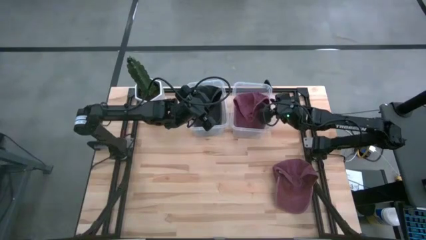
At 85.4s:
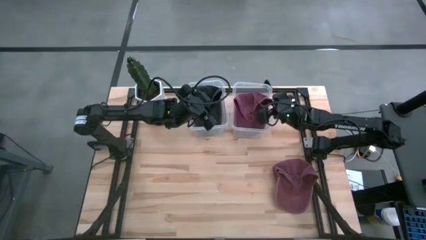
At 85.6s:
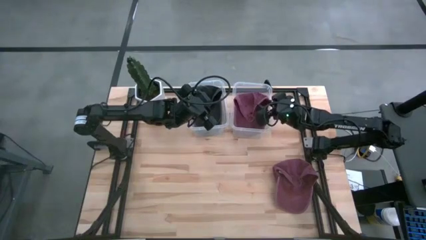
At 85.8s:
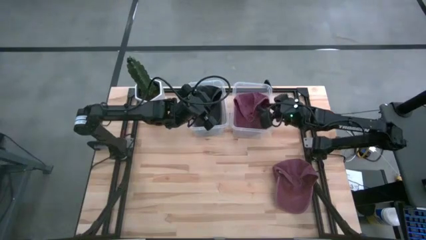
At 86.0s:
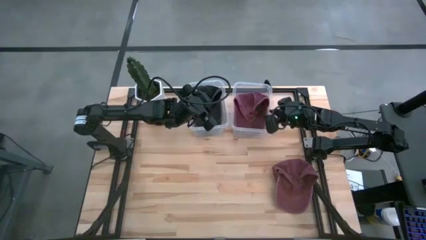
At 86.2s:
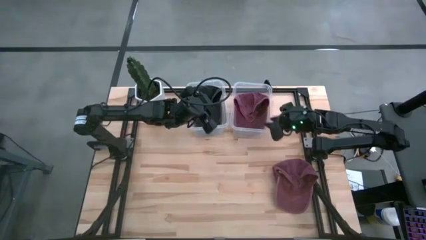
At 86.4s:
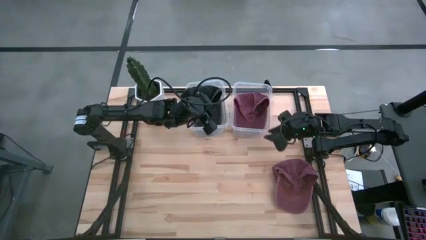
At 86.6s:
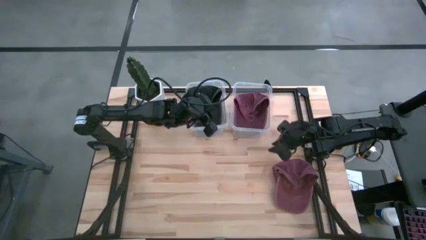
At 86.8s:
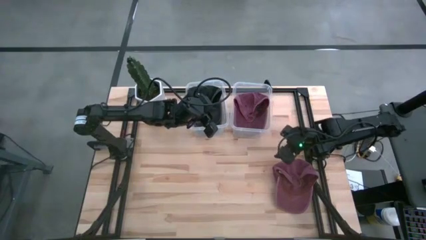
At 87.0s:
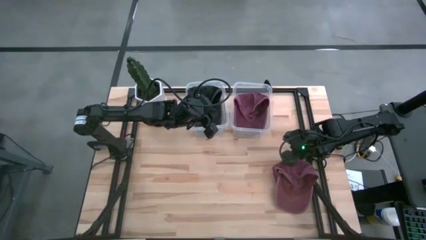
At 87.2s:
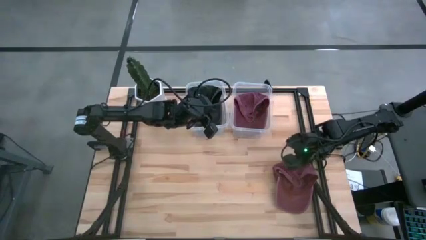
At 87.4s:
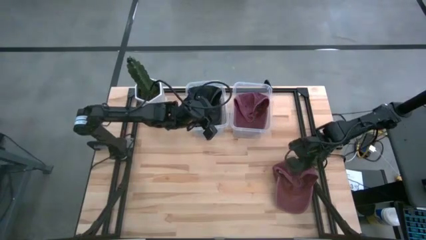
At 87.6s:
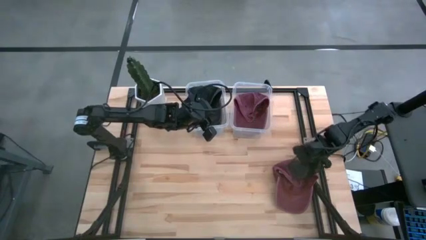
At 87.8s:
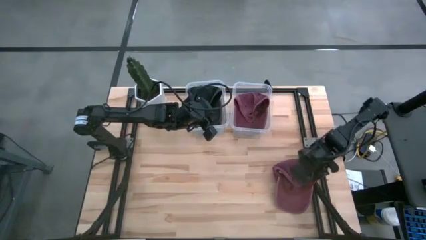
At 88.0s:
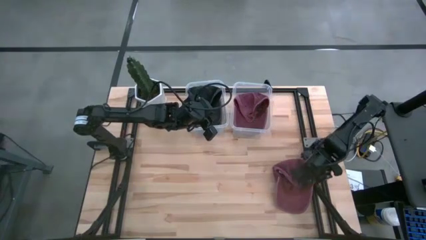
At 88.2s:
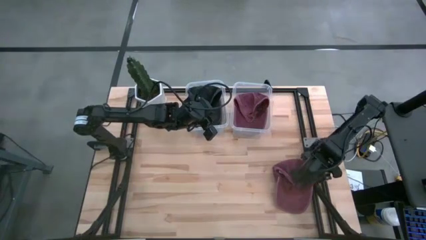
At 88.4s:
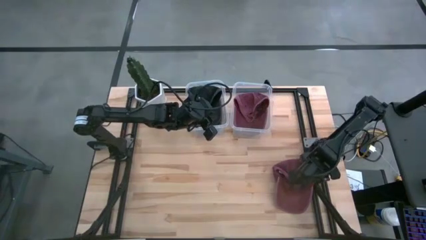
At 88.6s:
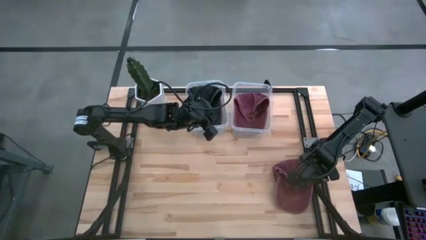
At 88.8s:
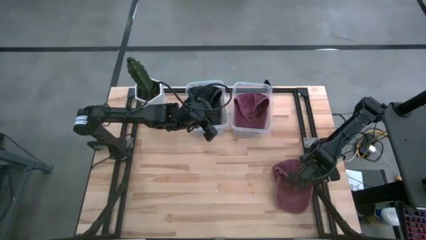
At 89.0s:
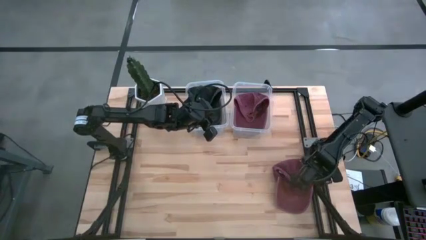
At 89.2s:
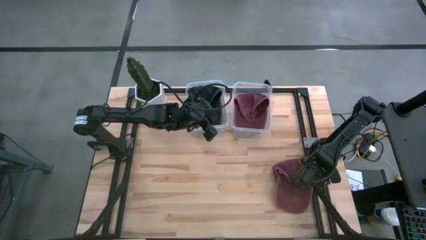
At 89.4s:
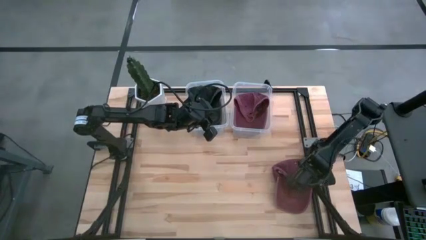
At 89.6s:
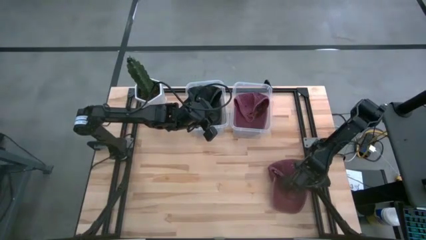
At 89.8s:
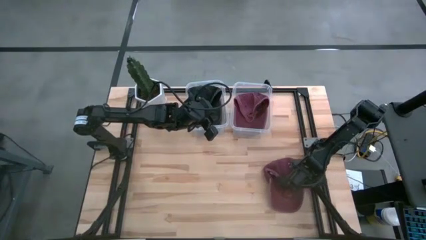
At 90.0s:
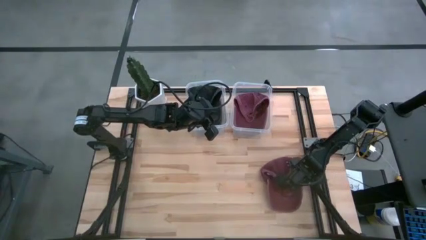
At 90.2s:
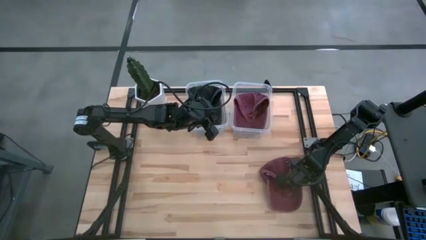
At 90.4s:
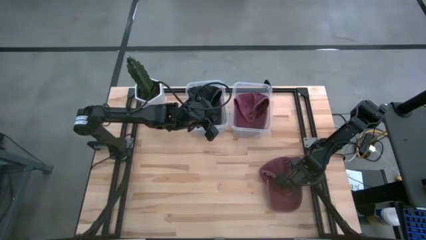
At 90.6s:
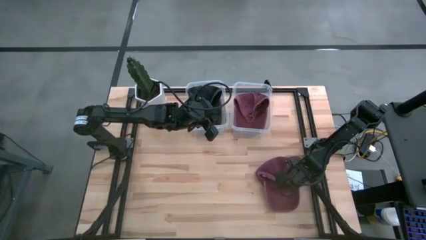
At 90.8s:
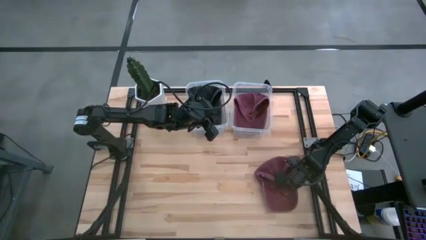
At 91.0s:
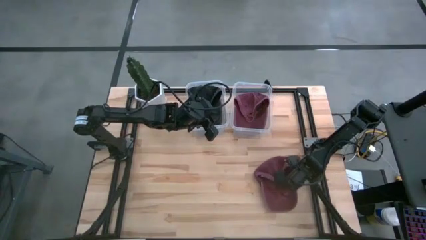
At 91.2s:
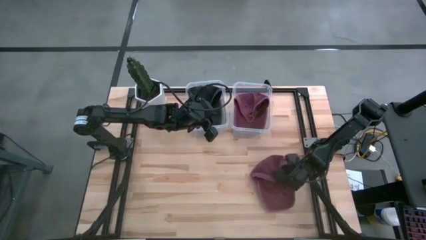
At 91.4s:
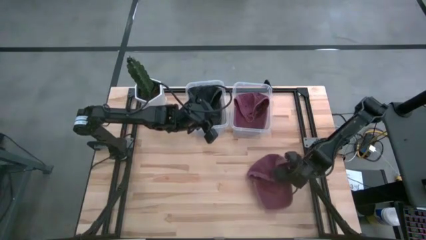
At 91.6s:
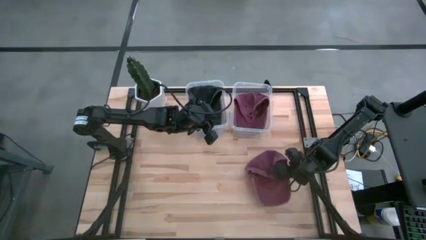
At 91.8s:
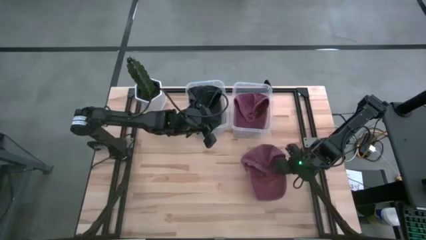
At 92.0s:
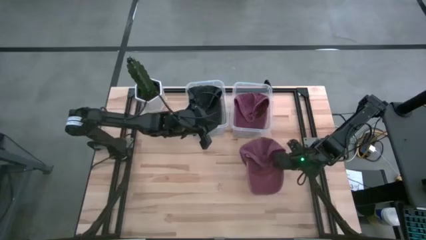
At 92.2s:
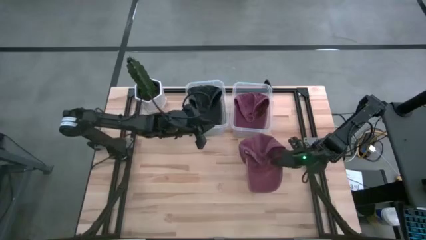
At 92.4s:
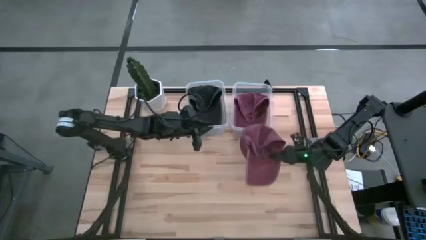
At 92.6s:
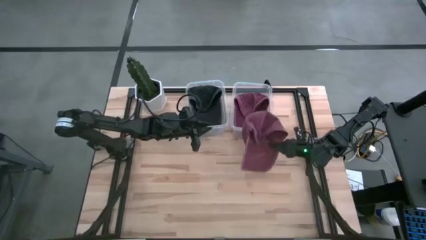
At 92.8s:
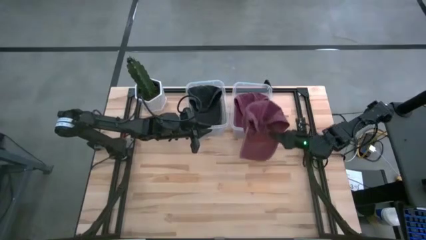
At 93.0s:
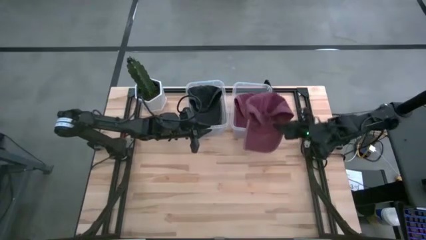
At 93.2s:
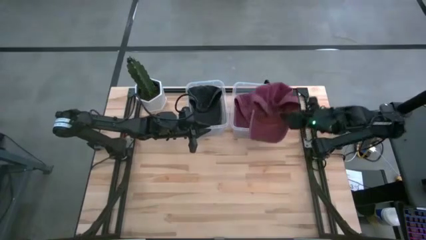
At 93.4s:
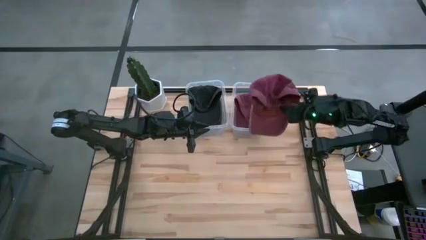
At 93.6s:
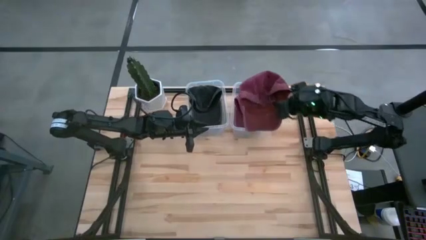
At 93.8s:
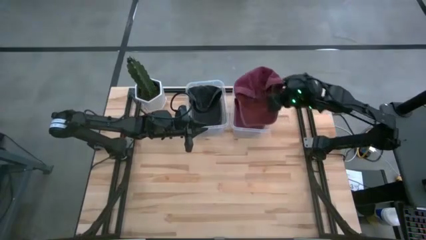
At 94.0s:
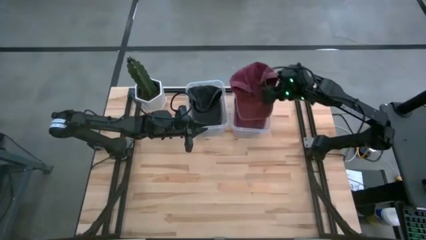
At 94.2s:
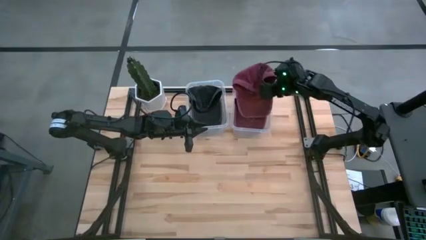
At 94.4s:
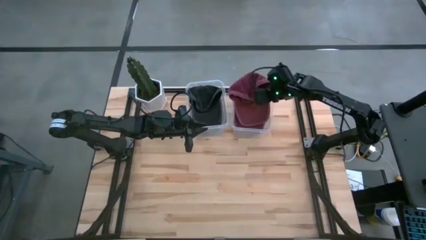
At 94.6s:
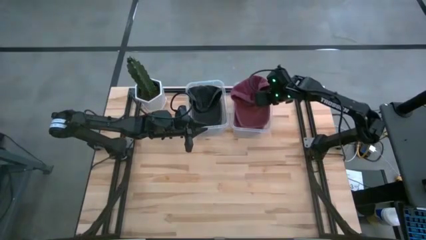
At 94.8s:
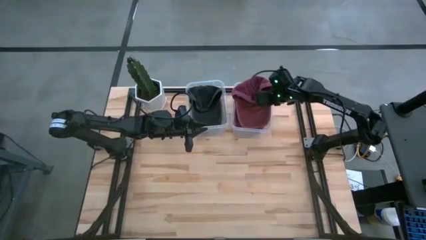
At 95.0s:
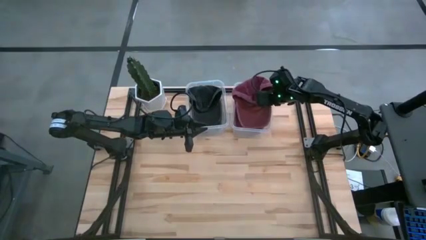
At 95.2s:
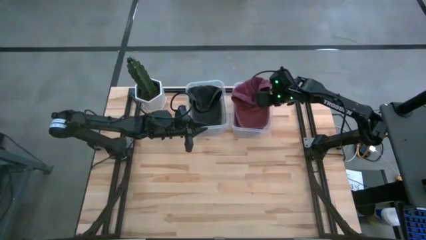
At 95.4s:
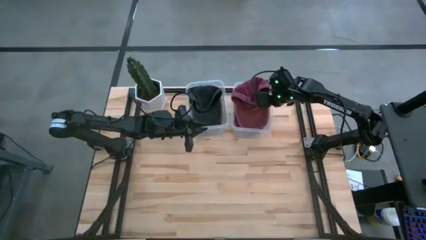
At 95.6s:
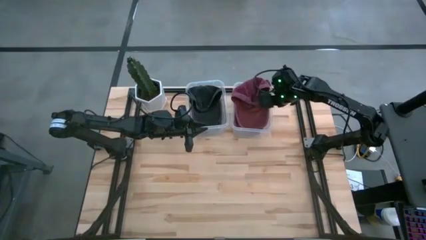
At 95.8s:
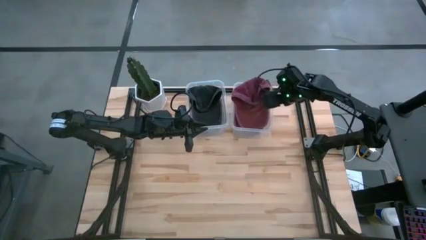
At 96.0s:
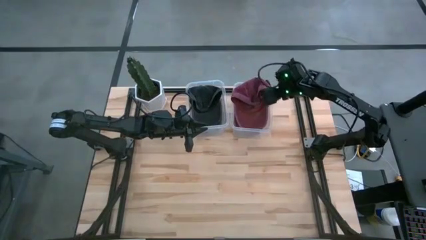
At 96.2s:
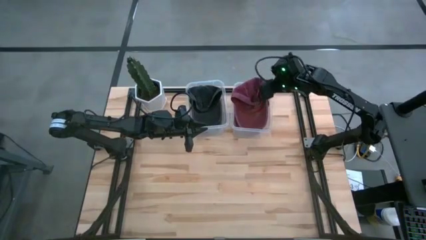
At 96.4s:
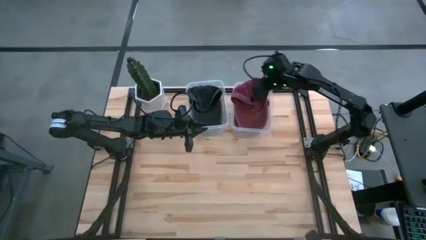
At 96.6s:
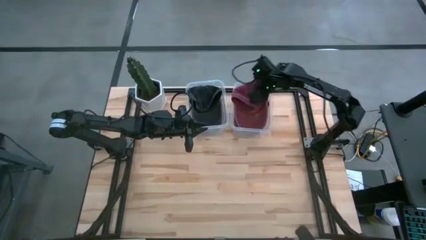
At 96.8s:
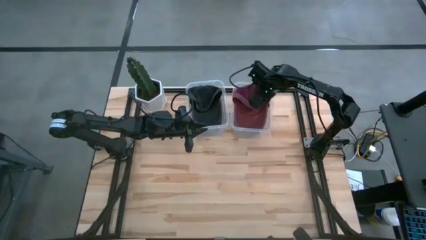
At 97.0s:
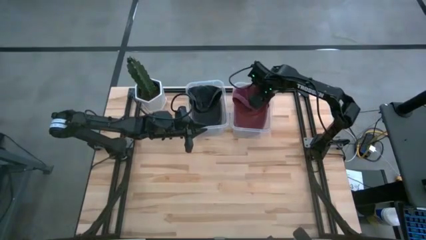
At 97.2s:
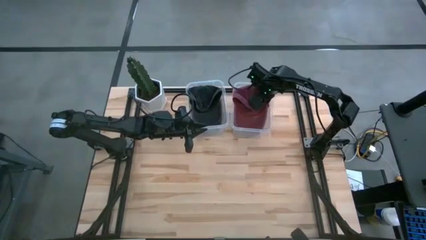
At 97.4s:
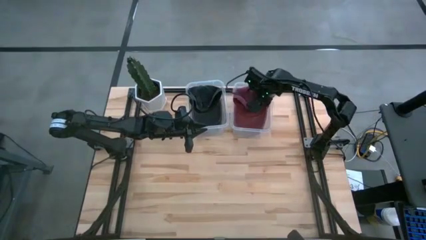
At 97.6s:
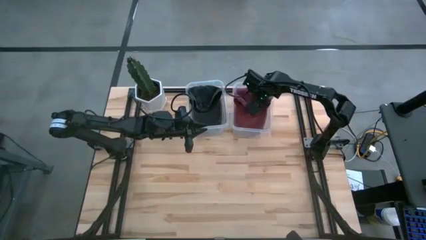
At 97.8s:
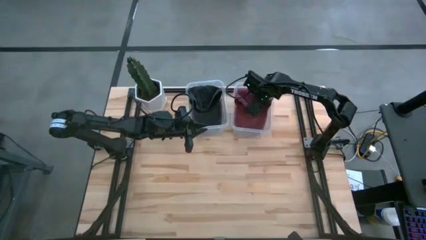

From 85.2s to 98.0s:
Task: Pick & Place hat
Put the pink cap into the right transparent bin
